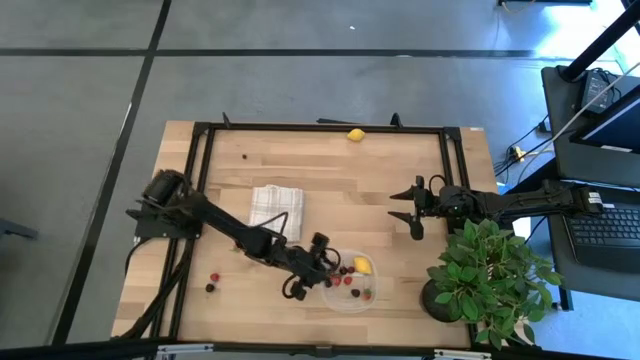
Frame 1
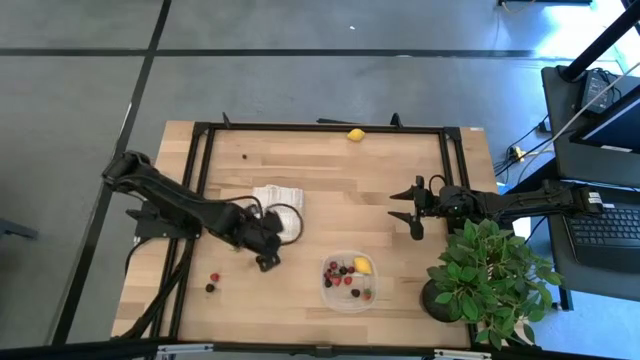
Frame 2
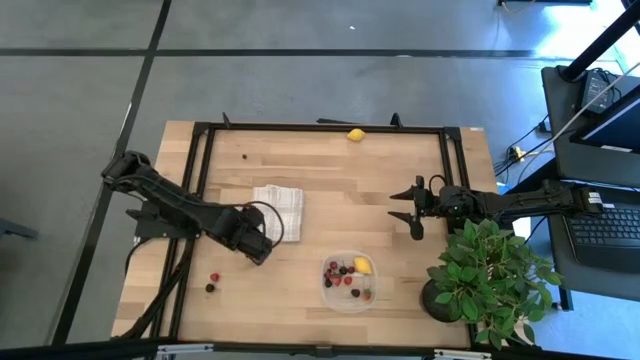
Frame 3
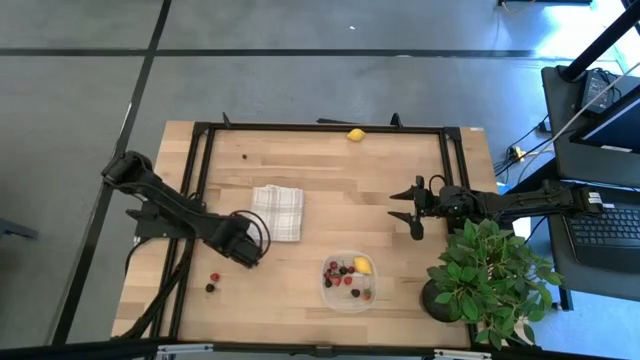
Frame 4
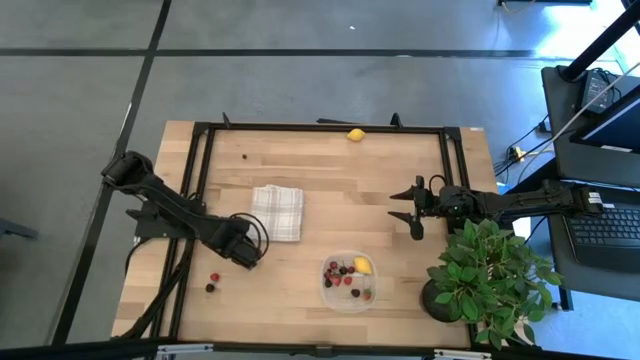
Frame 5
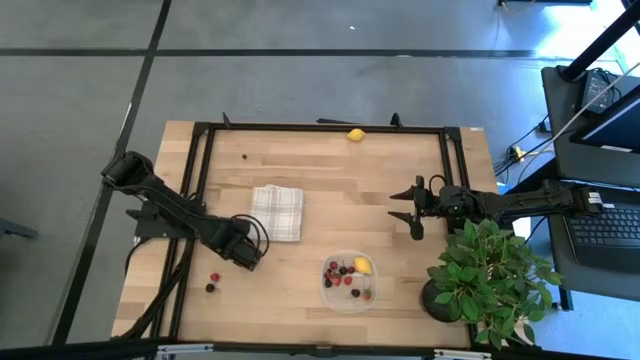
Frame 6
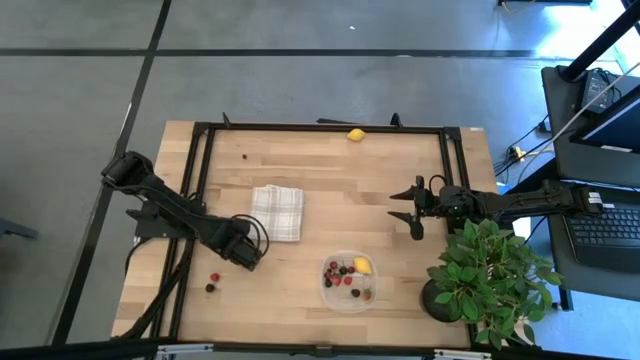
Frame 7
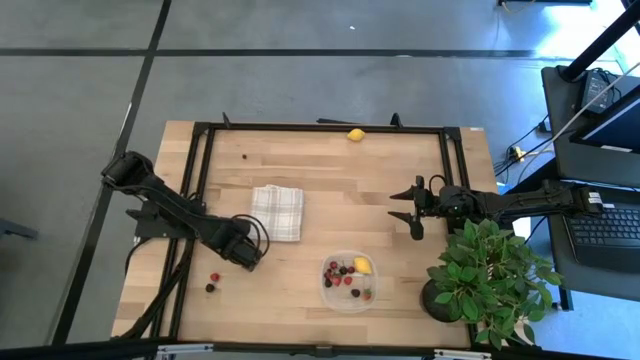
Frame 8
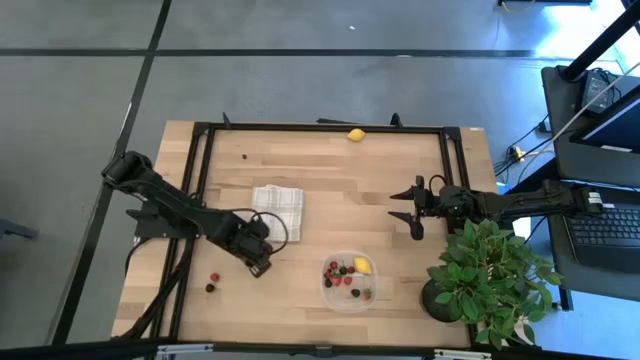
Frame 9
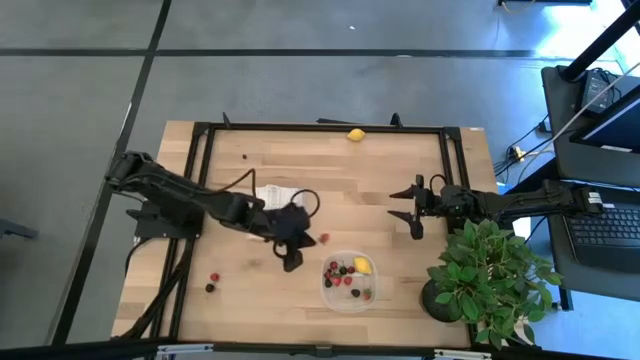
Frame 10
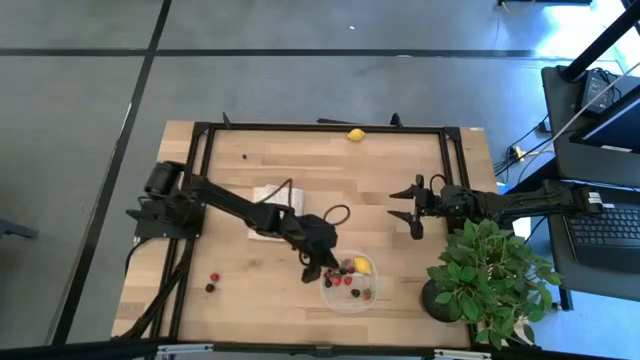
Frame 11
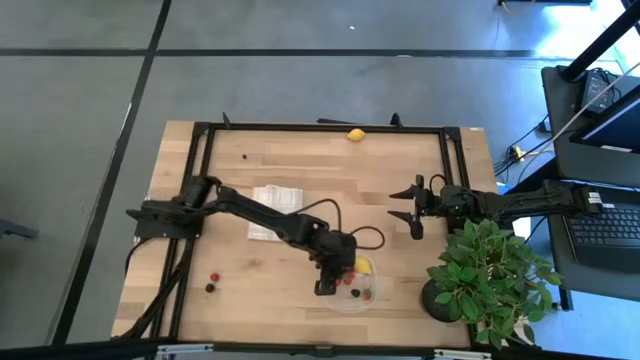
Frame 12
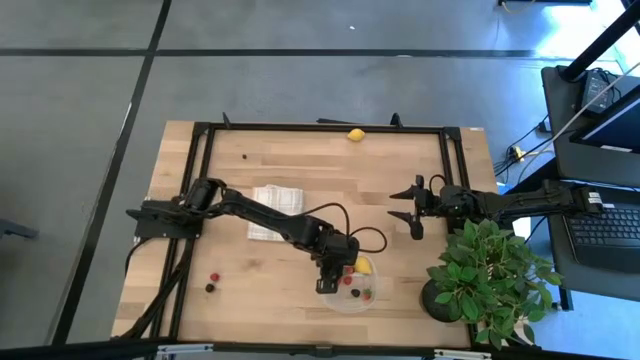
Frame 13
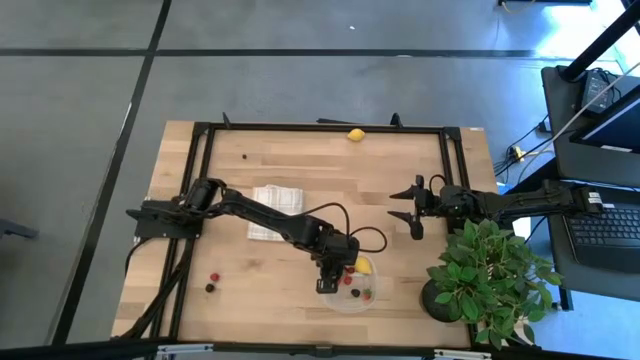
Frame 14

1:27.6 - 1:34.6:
Task: Pick and placing Produce into tupperware
Put the strawberry into the transparent container

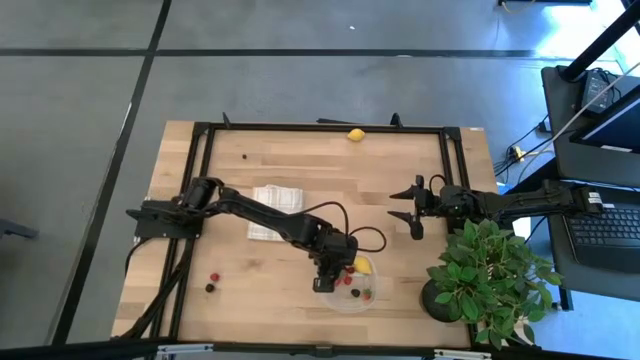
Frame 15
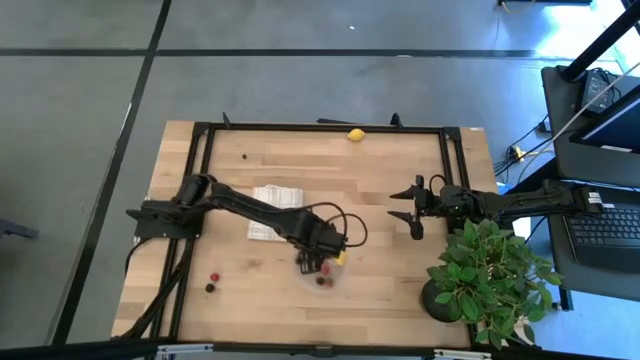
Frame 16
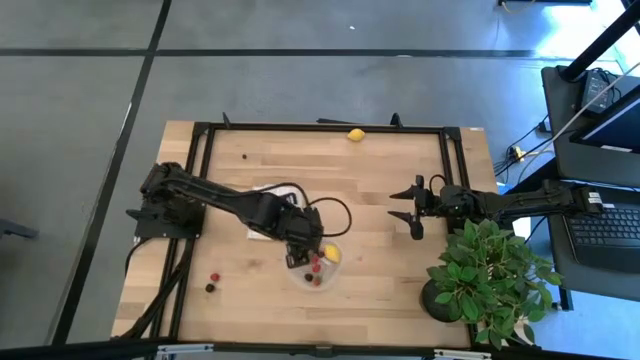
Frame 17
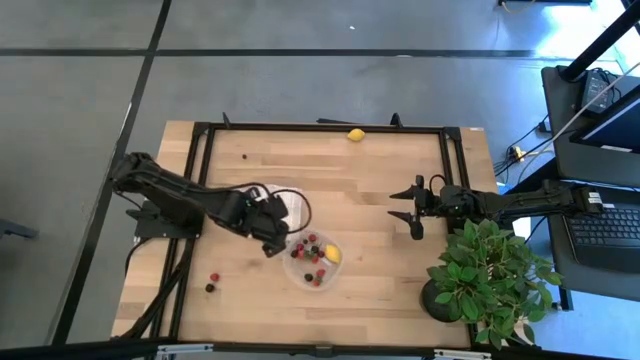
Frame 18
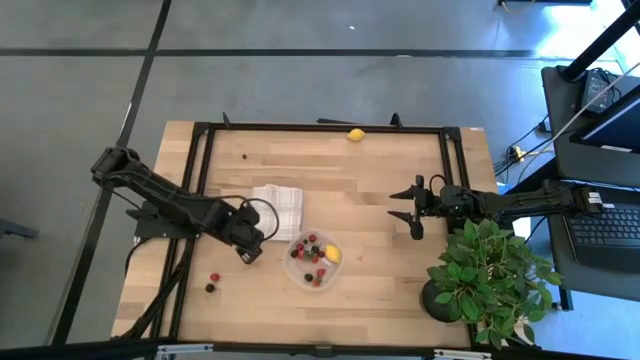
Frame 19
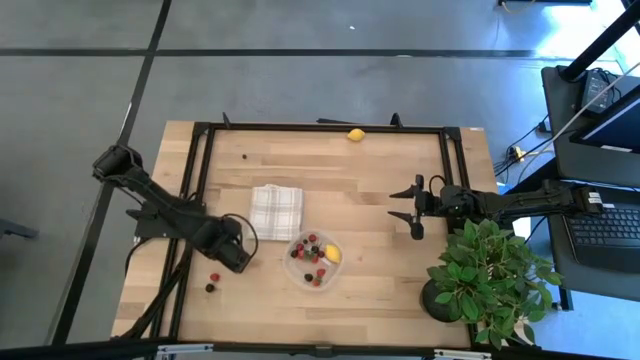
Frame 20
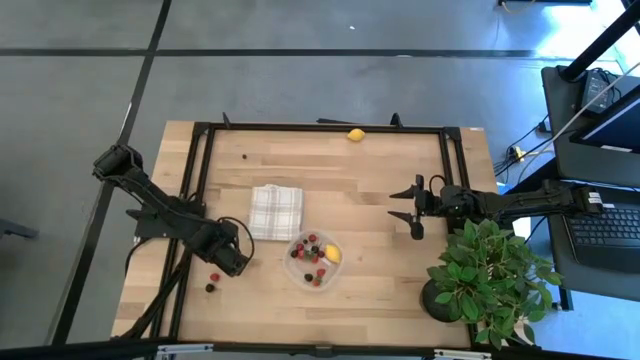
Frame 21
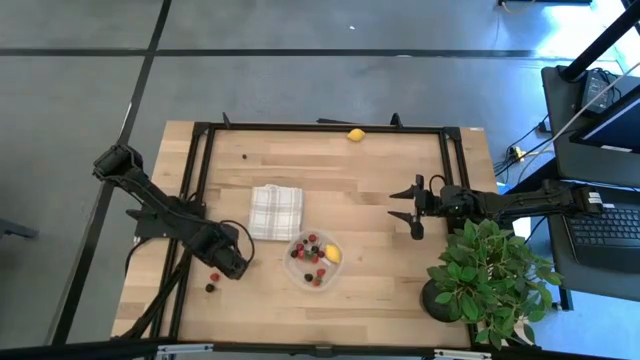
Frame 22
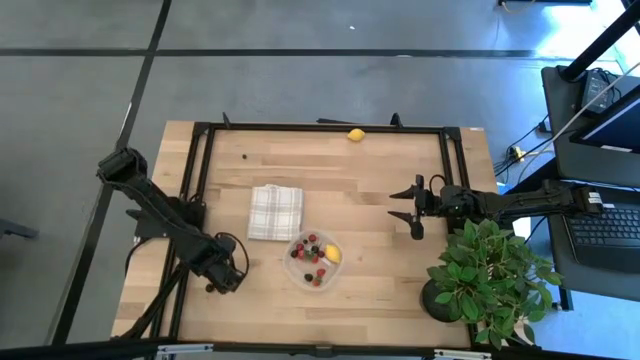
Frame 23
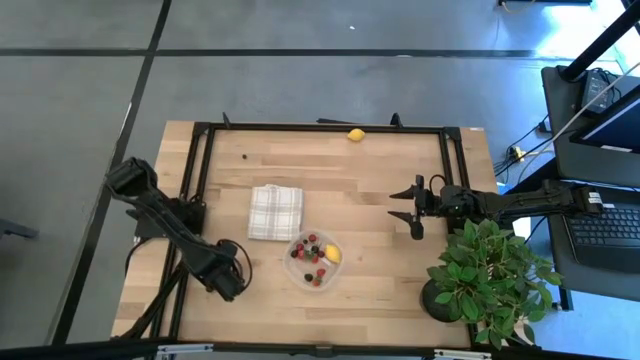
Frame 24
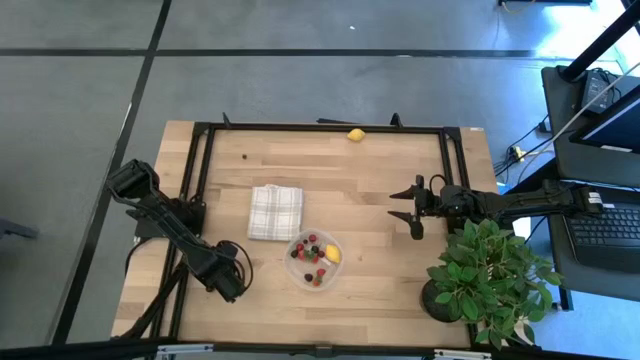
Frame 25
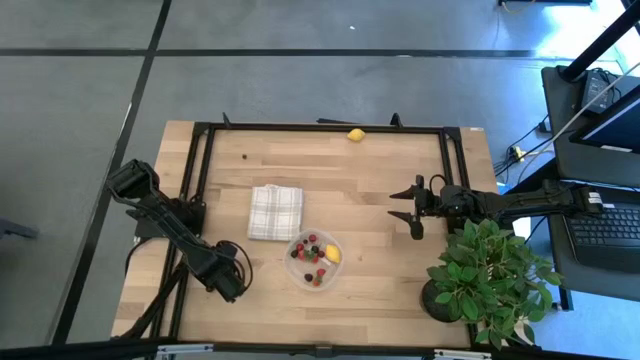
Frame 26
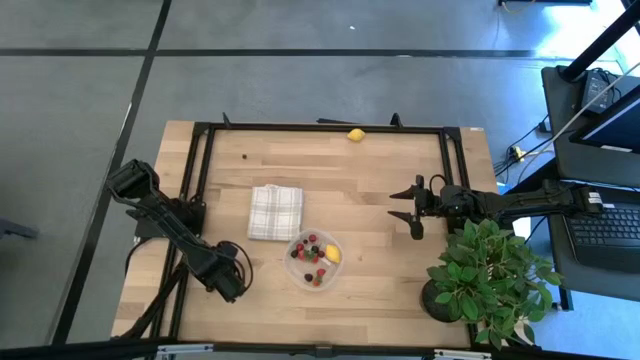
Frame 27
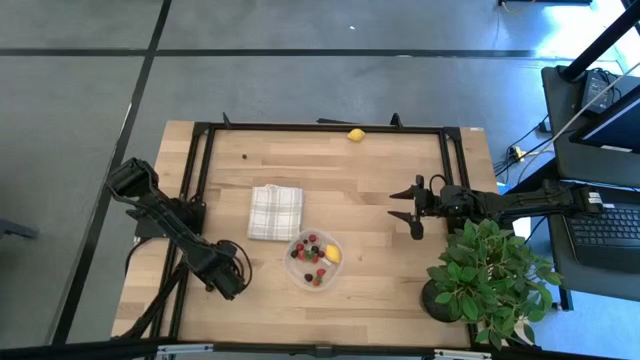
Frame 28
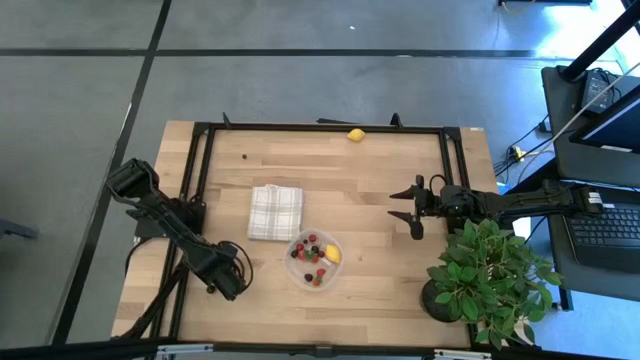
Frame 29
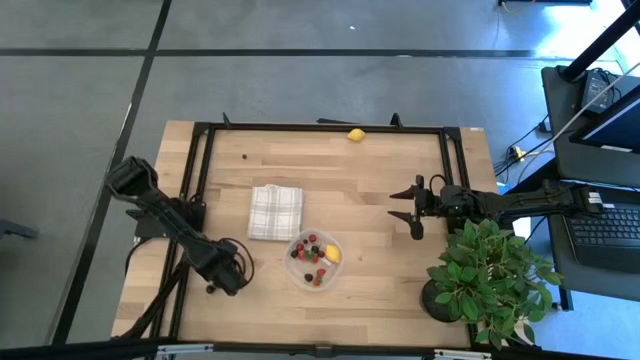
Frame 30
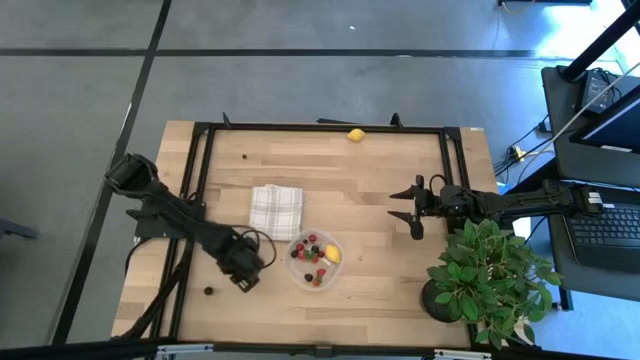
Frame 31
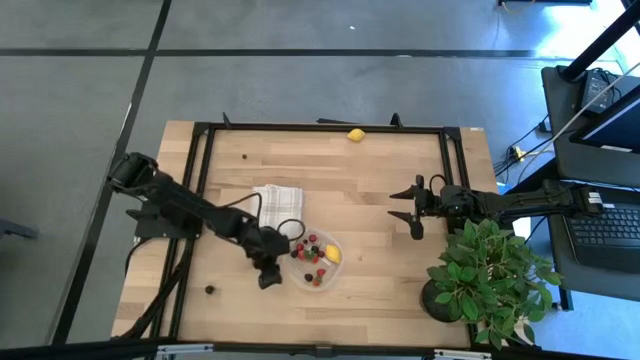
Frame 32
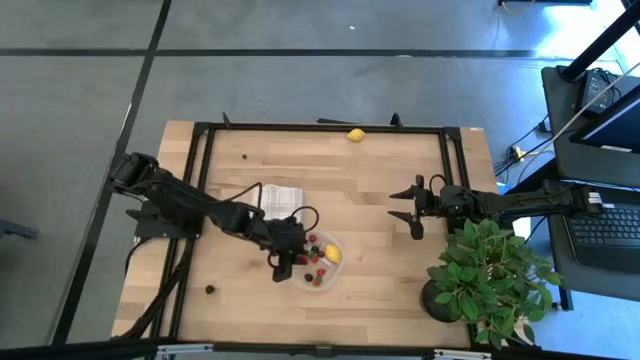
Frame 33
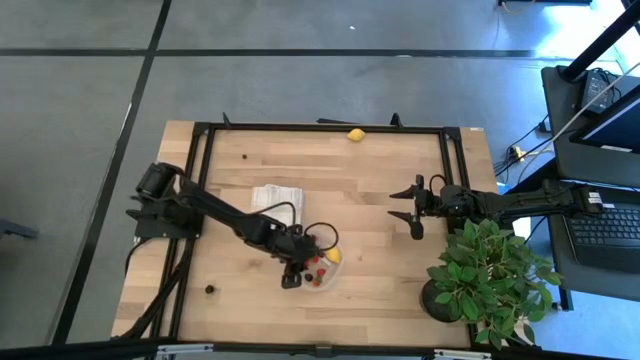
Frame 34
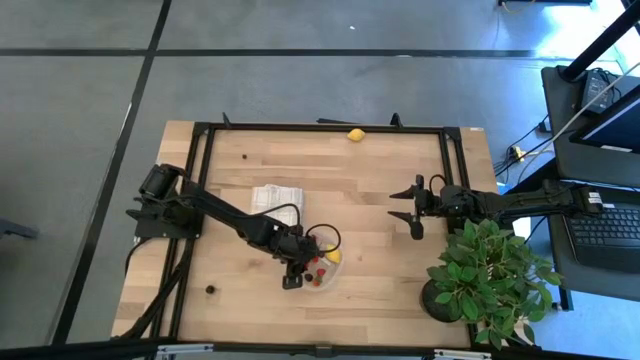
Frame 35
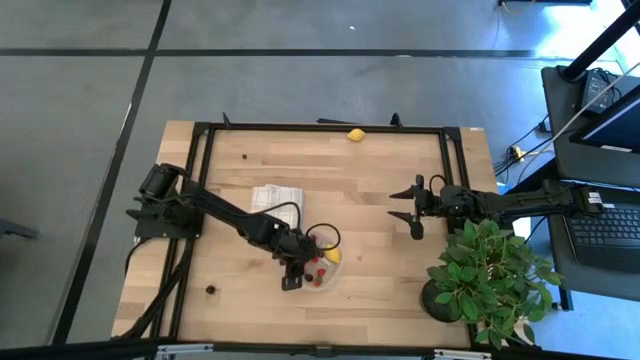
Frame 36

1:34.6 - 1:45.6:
Put the raspberry into the transparent container

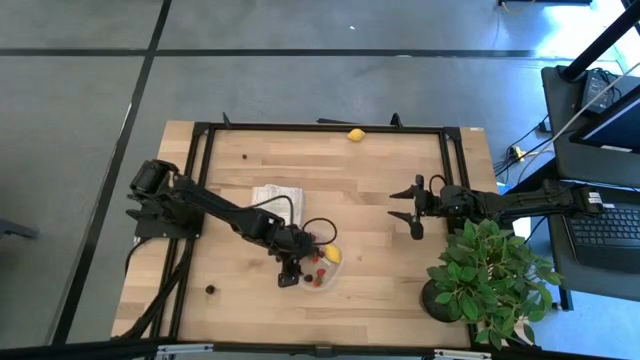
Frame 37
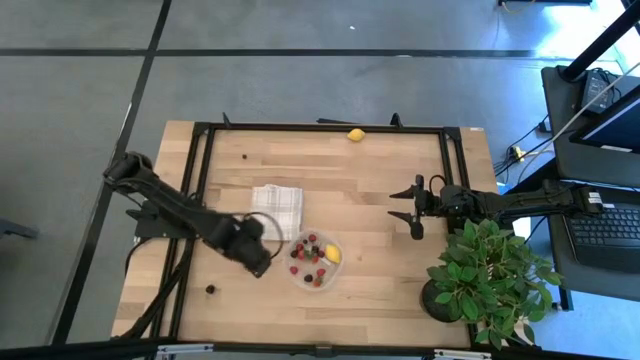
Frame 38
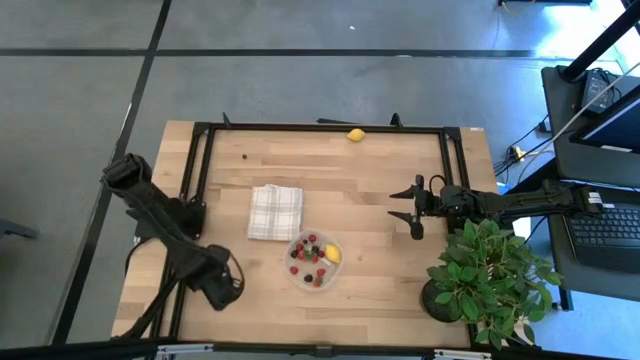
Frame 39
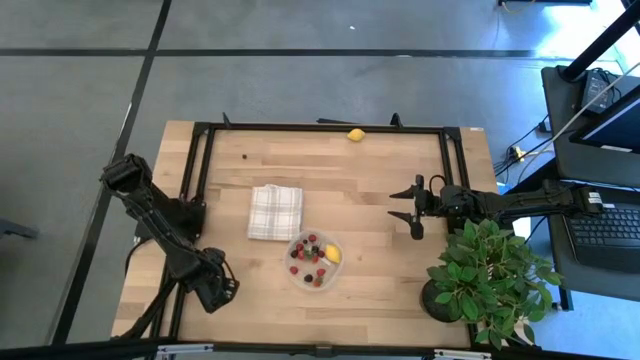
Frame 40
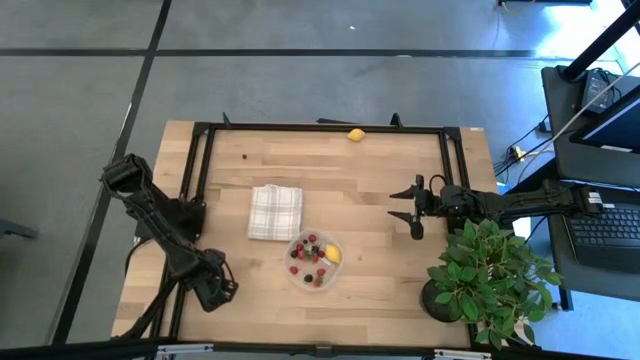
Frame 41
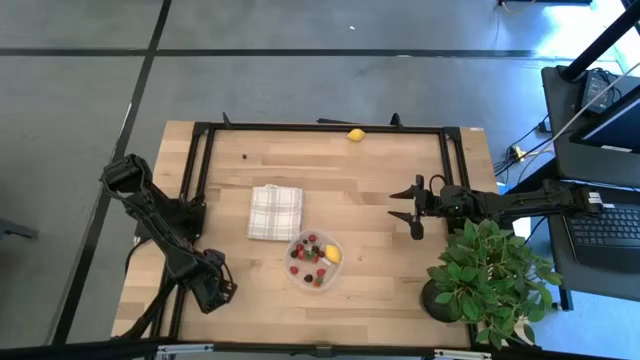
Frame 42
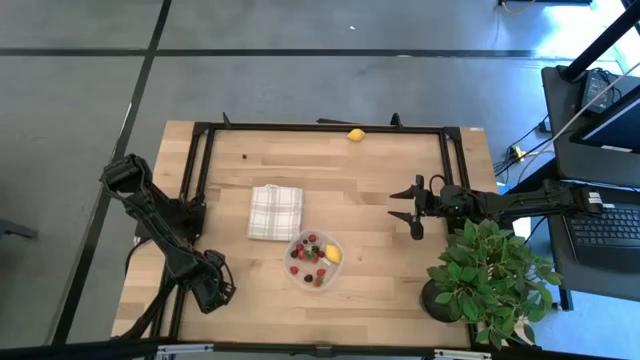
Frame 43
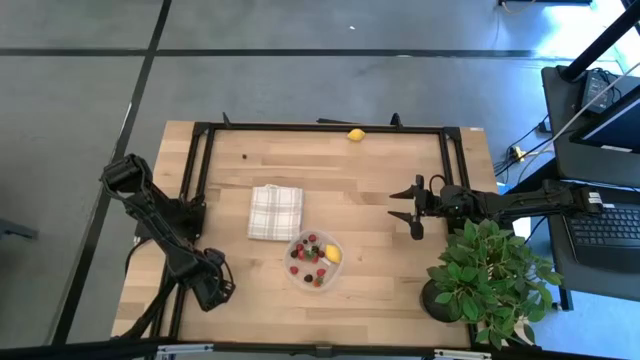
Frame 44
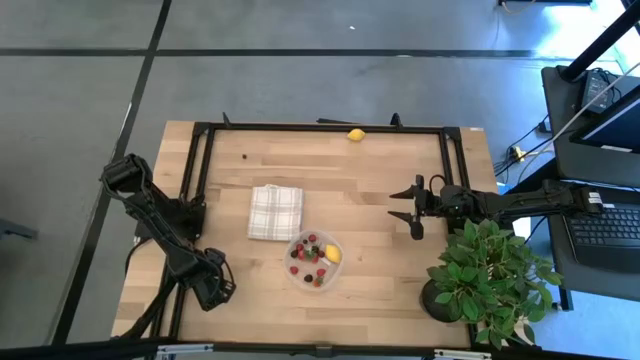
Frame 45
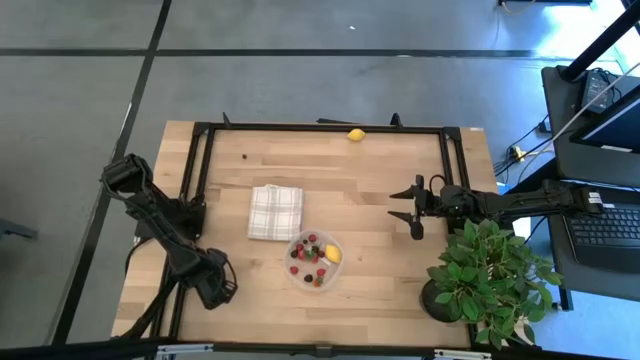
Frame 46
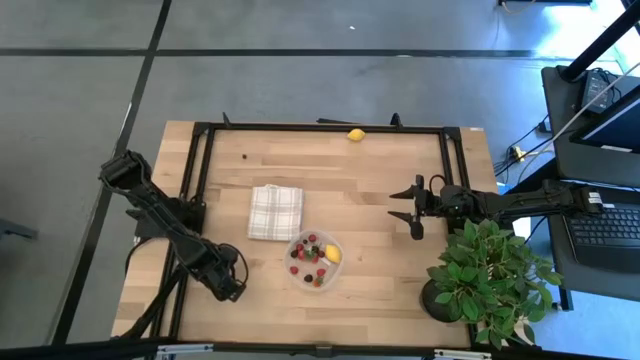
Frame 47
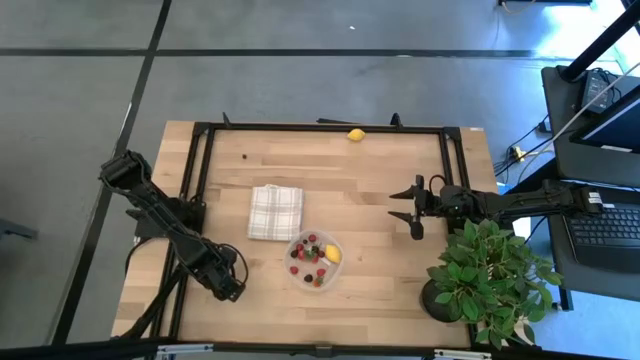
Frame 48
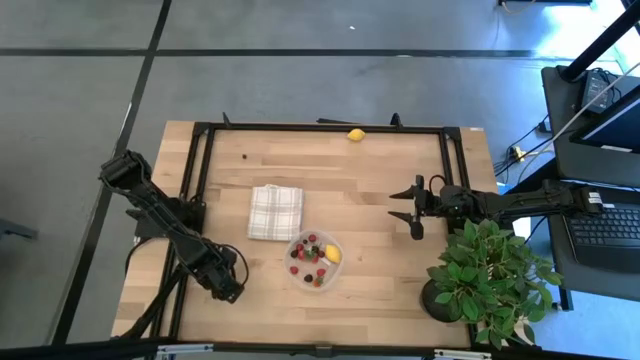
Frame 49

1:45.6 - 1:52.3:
Put the black cherry into the transparent container
